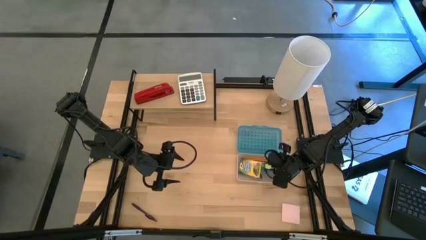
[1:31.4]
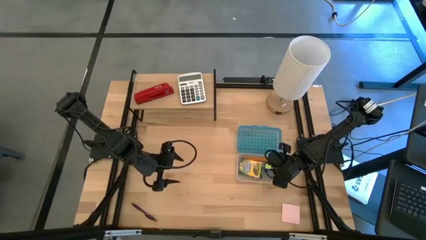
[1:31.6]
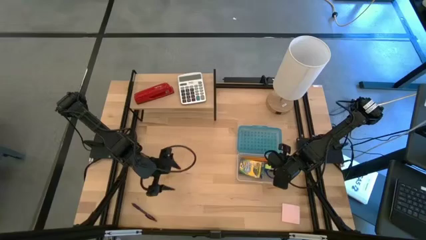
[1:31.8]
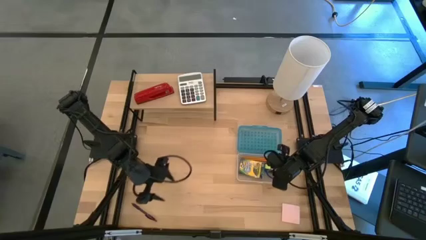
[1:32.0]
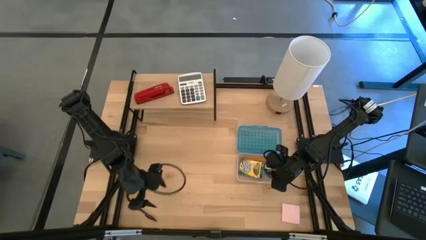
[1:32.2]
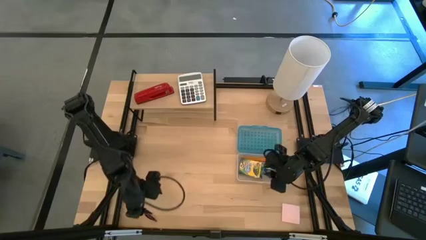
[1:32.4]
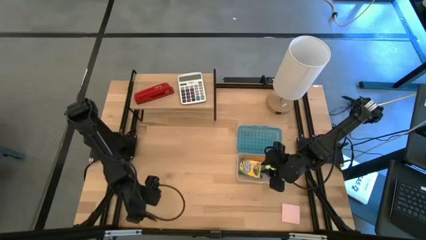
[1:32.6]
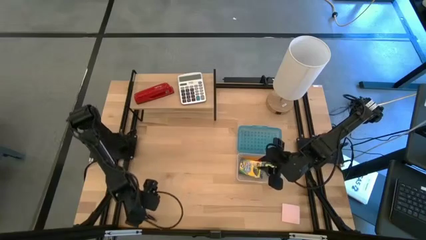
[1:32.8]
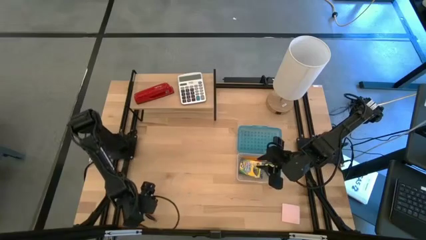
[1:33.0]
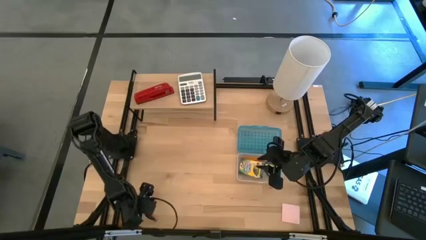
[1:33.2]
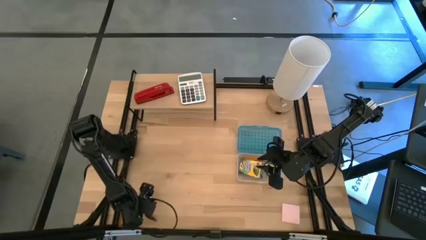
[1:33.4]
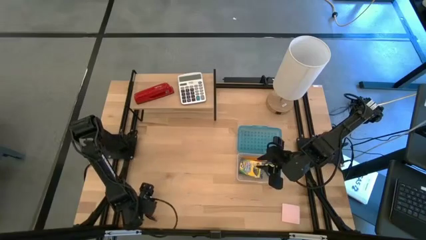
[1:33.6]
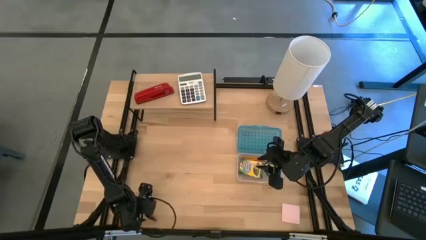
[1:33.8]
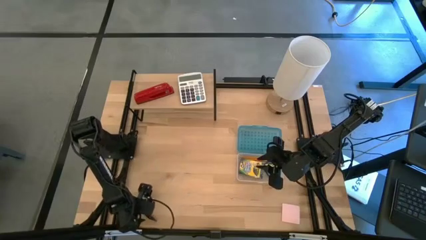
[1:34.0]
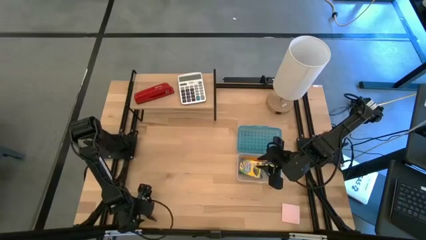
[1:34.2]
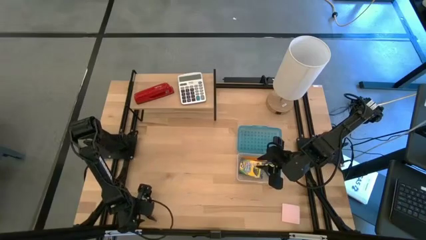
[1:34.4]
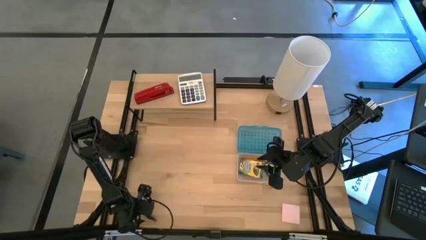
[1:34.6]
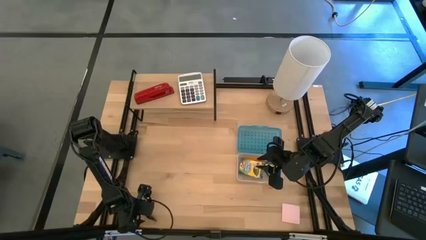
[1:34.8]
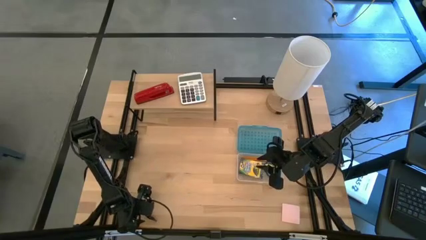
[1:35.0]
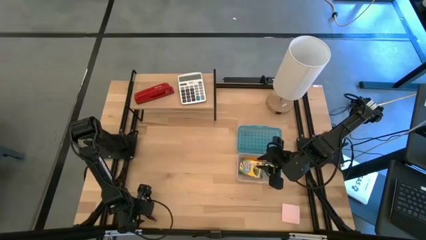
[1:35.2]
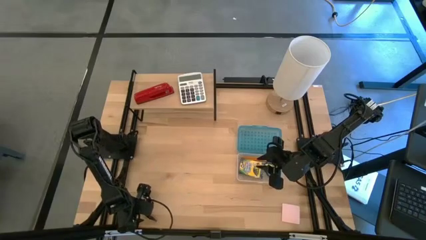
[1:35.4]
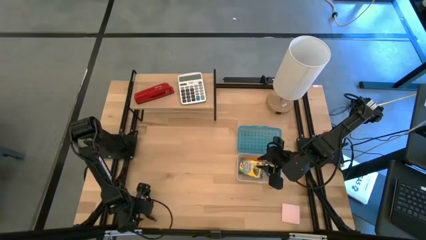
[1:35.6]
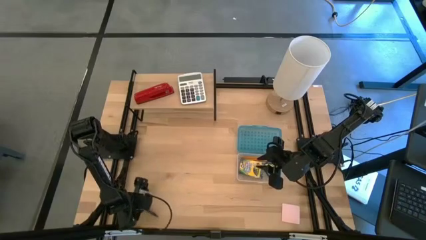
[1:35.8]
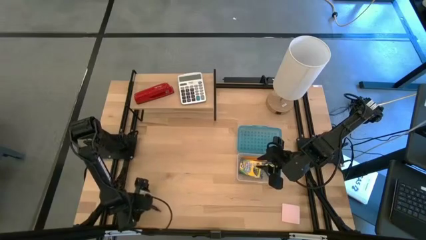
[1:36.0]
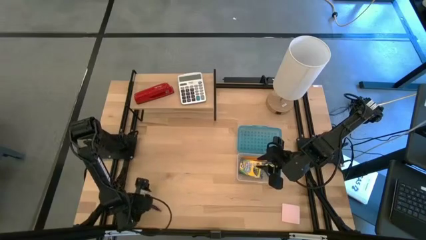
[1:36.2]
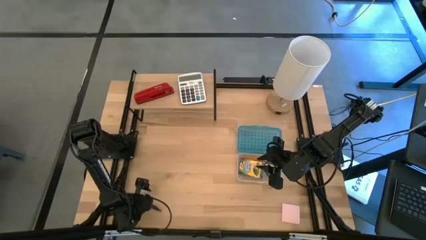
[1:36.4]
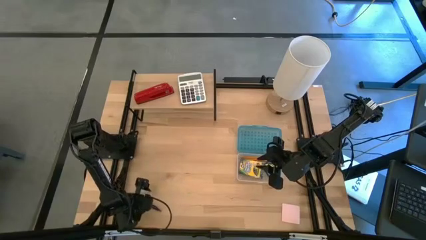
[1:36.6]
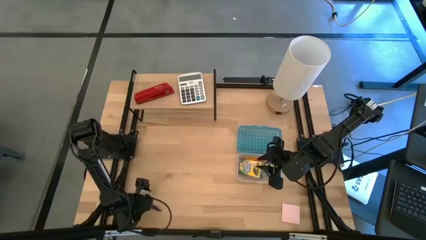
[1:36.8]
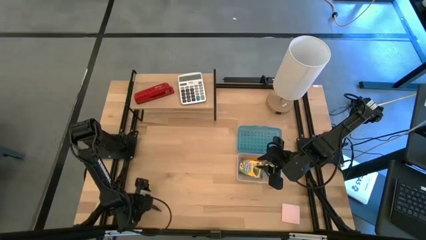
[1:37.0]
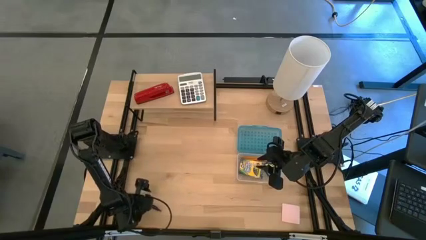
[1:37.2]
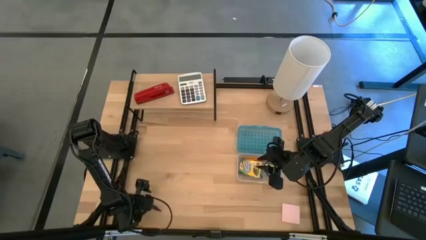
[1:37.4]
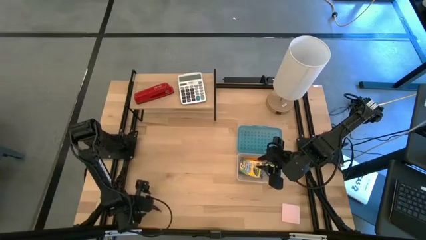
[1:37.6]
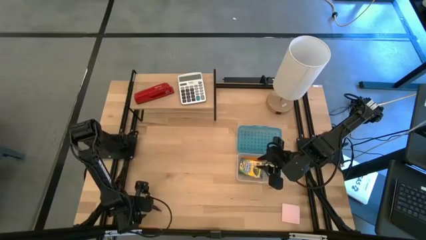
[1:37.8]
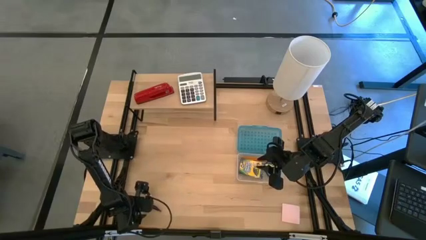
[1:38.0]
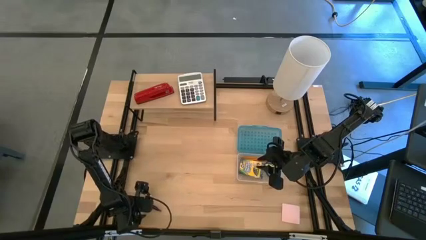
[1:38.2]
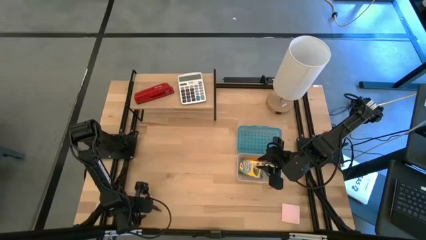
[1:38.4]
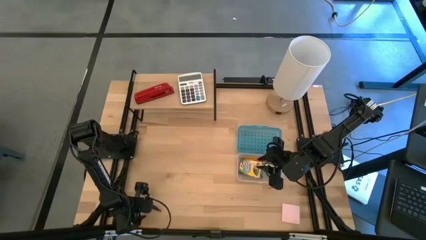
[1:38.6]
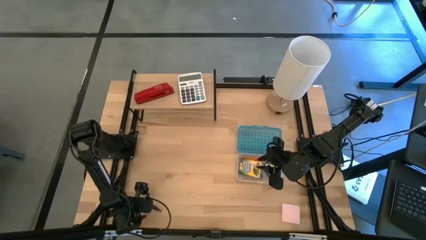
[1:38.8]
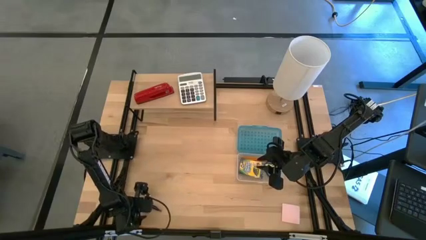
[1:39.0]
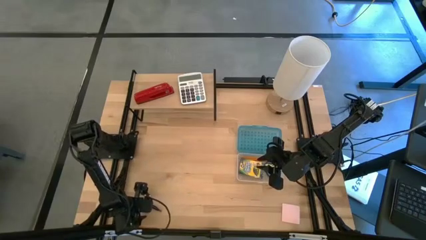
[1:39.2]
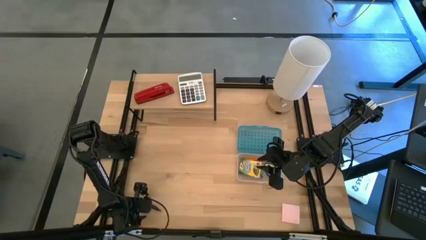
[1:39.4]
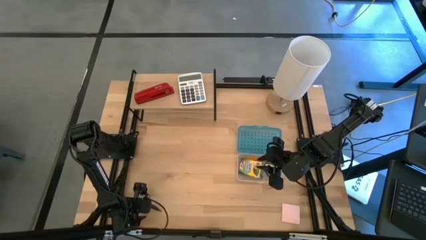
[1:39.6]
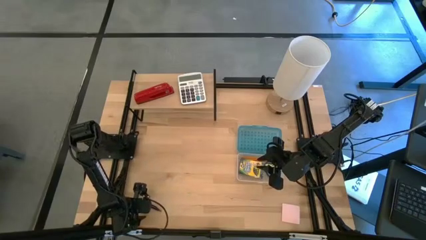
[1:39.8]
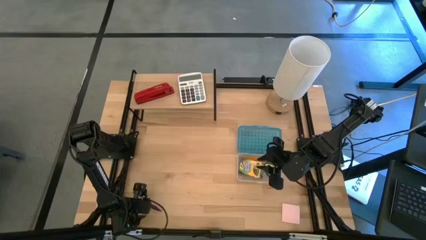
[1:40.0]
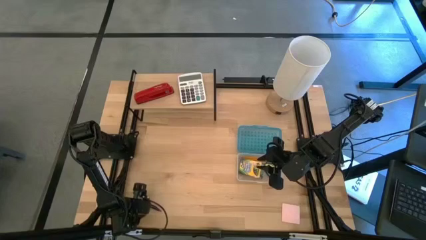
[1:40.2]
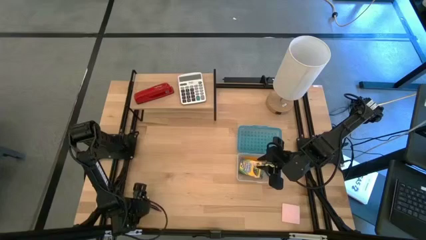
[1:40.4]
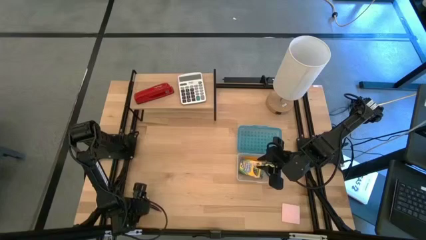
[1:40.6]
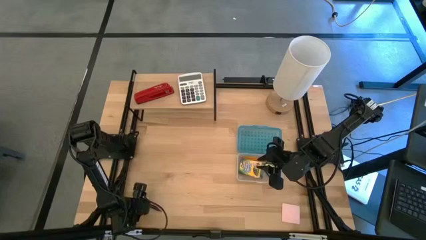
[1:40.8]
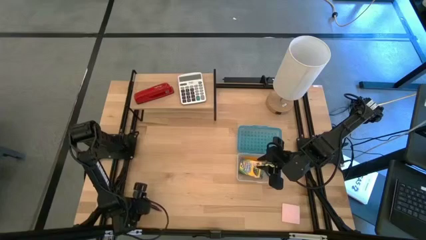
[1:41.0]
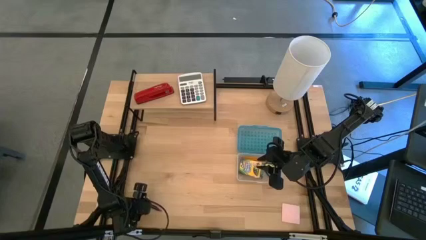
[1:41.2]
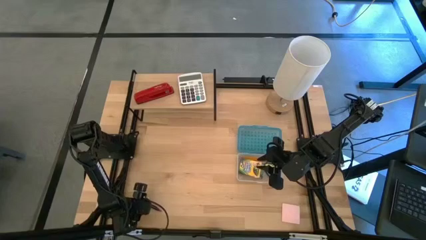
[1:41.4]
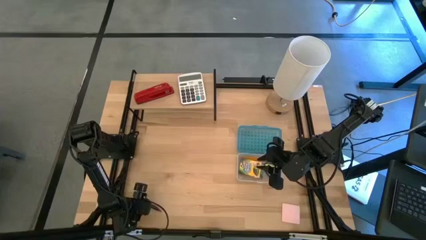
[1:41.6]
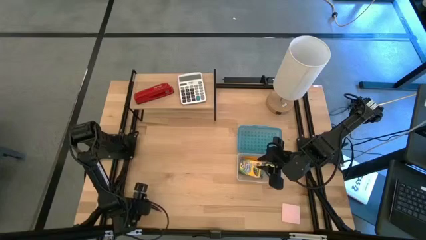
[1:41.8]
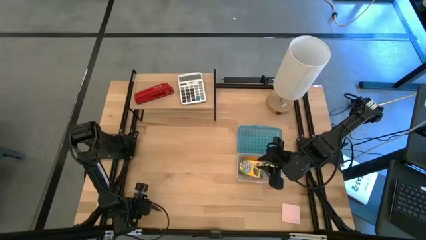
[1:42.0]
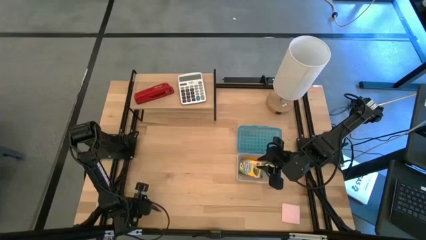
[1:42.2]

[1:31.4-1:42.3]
Task: Pack school essentials
Put the purple pen into the blue supply box

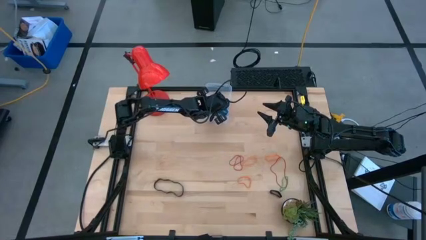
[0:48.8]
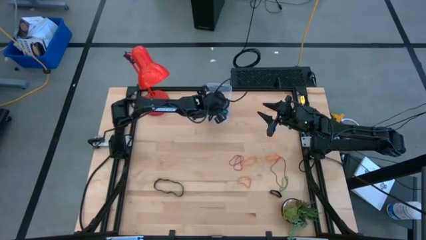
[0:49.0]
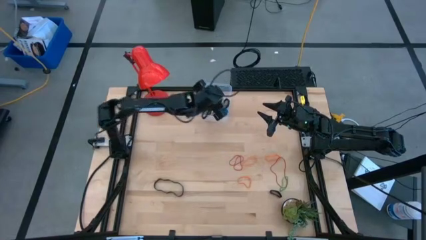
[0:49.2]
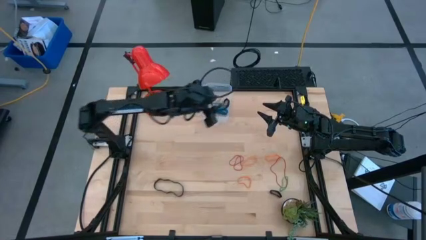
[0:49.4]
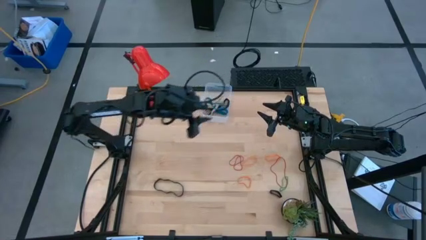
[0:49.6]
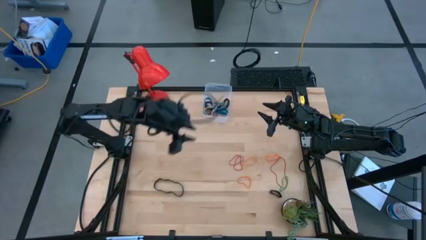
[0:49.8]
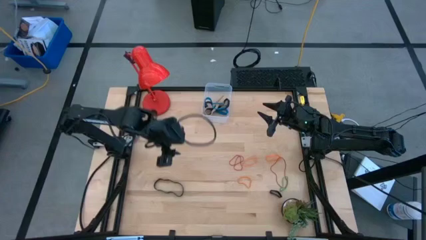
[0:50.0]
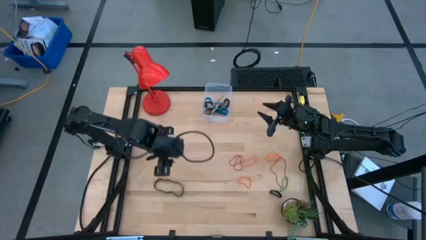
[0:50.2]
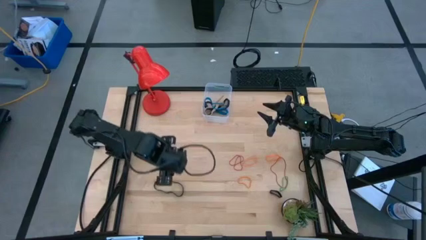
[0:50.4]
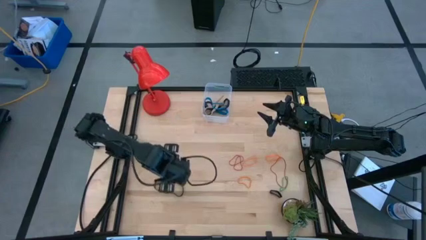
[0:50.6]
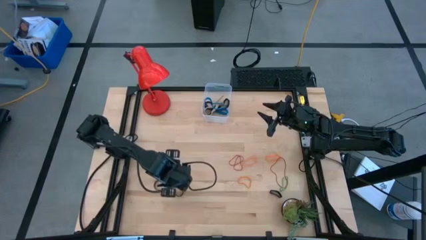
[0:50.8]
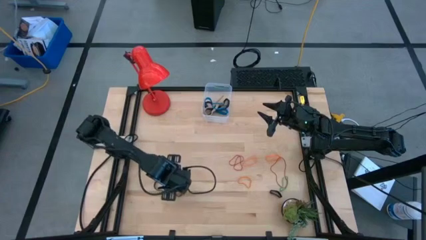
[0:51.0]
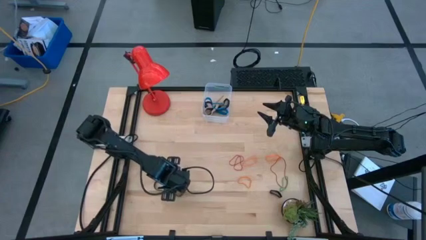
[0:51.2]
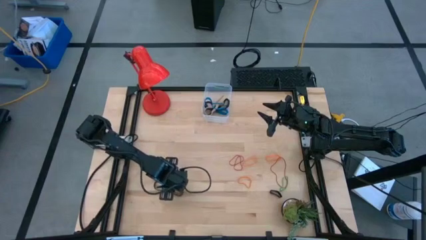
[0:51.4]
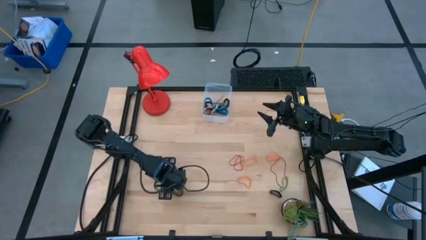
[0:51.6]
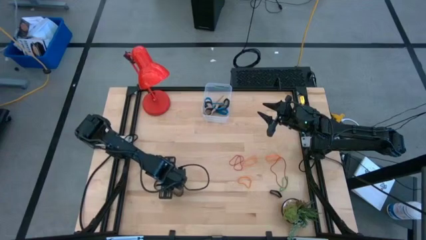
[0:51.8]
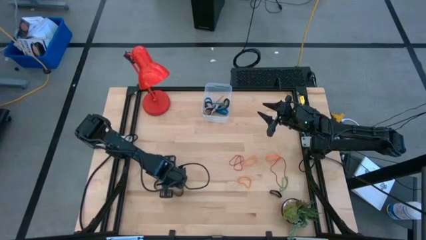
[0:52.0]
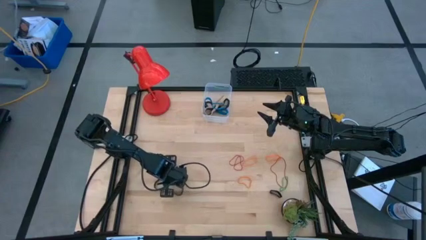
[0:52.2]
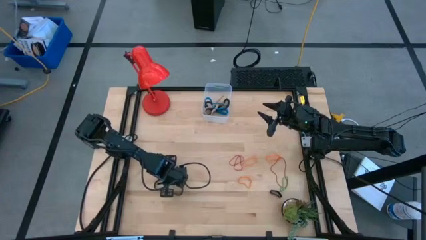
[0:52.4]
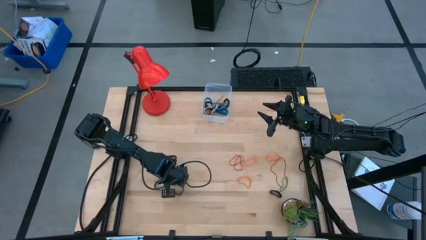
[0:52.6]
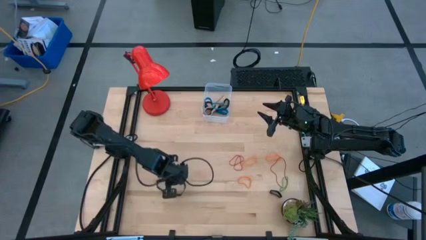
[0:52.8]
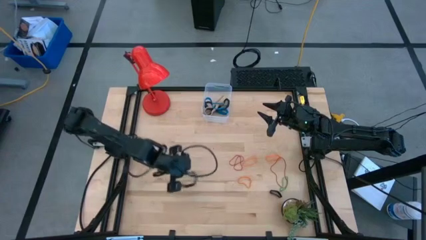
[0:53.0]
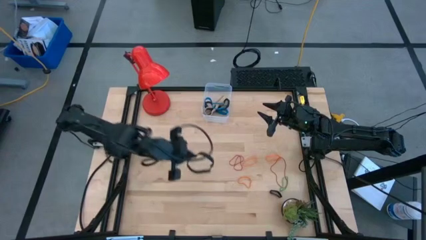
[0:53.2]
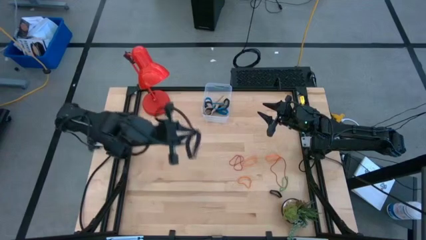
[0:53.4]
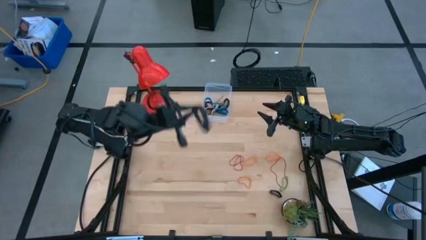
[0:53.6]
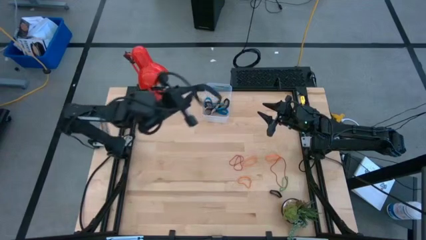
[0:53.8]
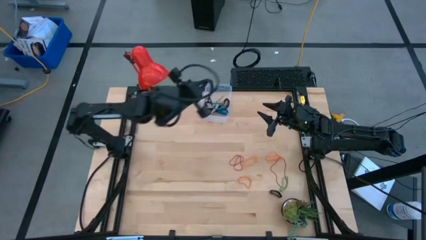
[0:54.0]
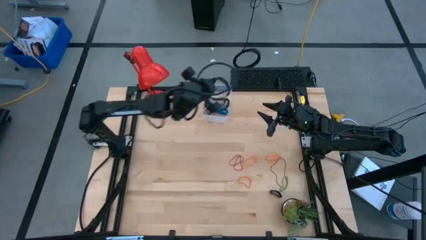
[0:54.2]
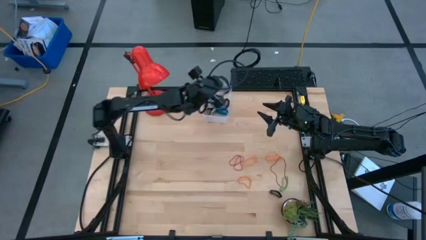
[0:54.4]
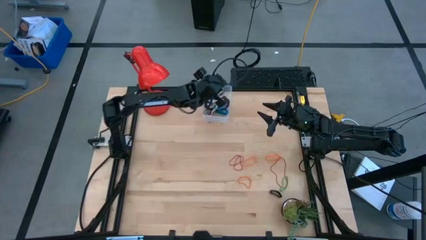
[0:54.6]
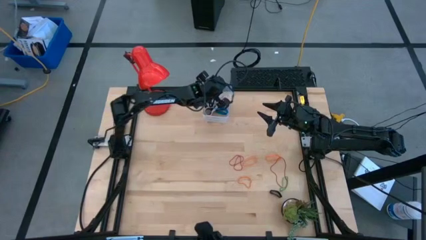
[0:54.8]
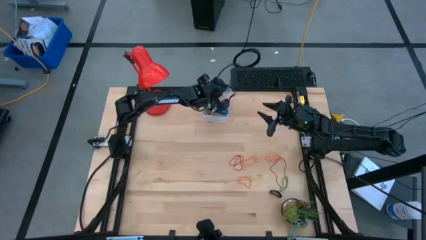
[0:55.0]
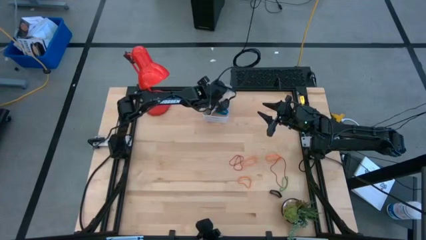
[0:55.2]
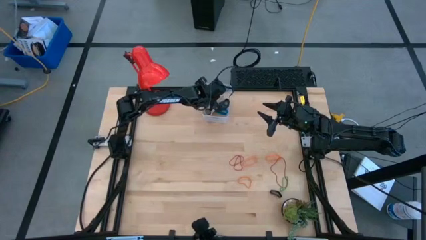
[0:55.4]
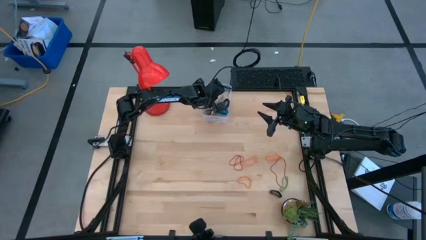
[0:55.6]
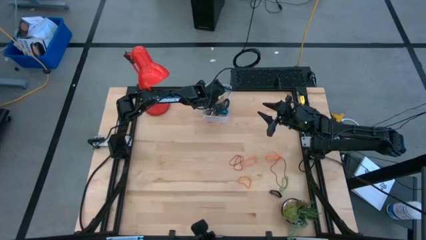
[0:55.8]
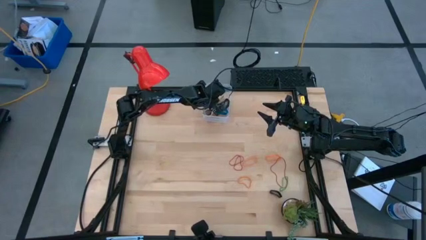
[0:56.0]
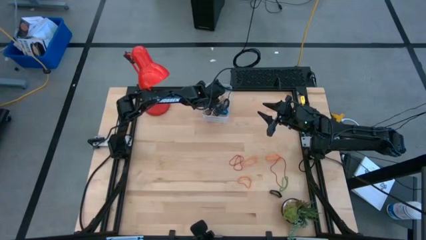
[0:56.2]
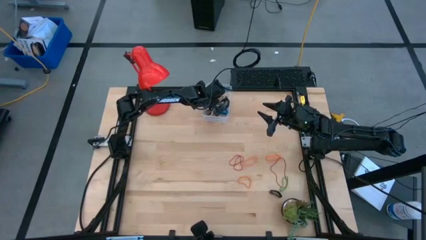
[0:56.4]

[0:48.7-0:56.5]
Task: Pick and place rubber bands into bin
Put the black rubber band into the transparent bin
